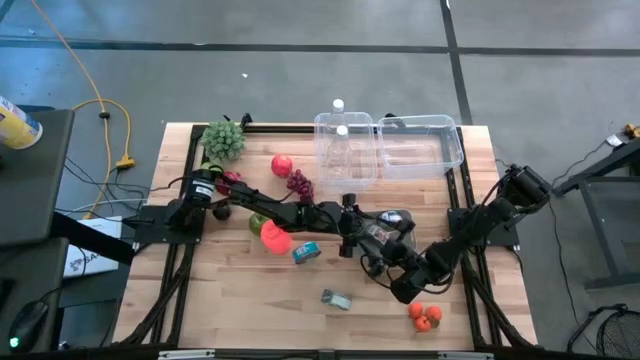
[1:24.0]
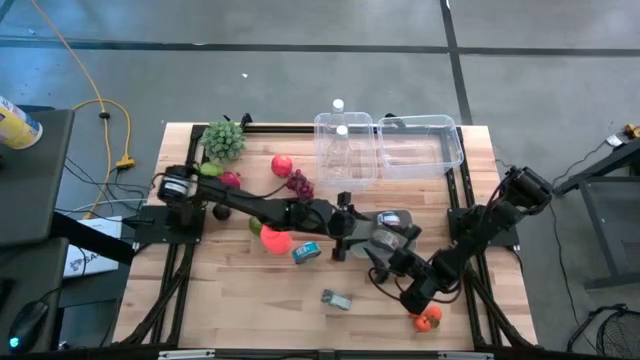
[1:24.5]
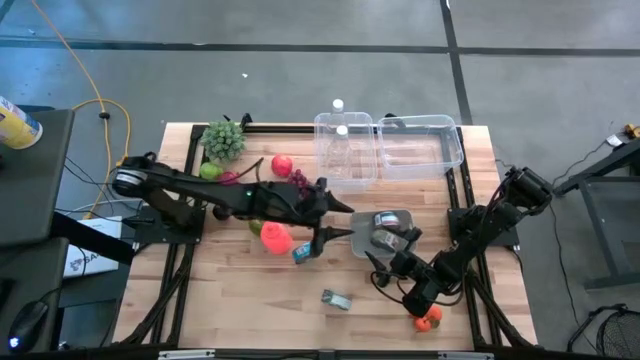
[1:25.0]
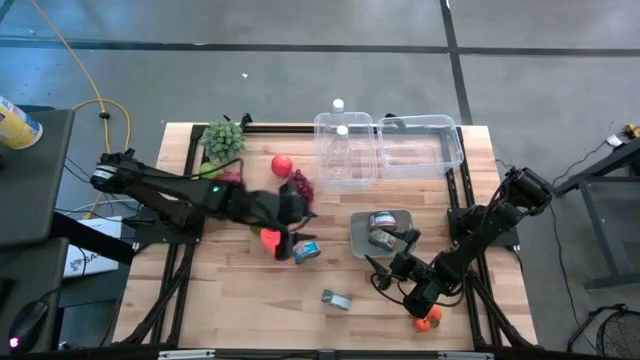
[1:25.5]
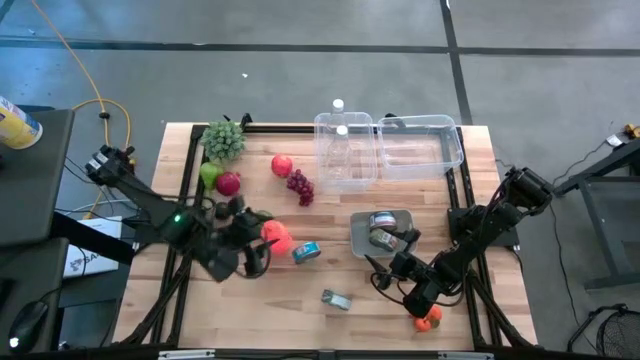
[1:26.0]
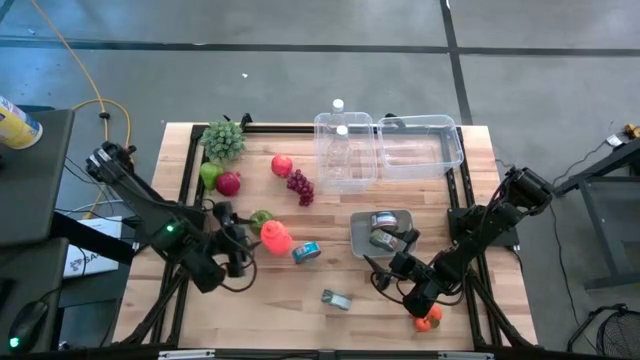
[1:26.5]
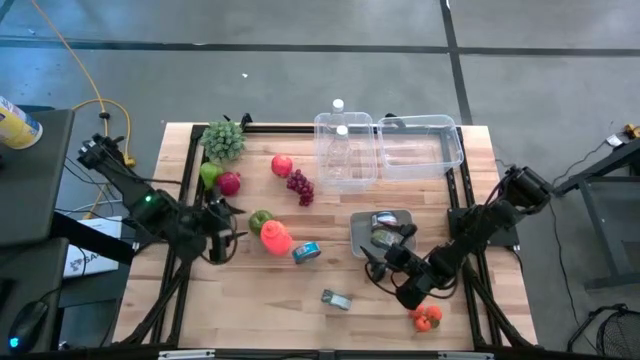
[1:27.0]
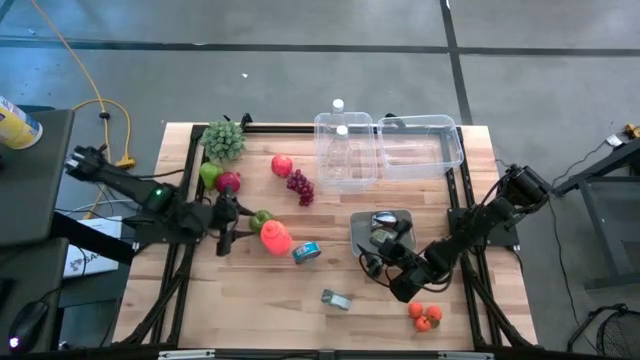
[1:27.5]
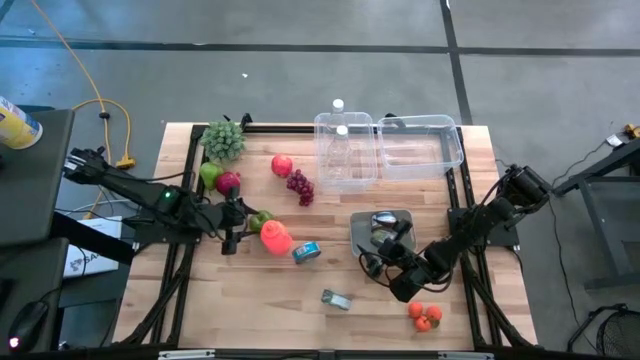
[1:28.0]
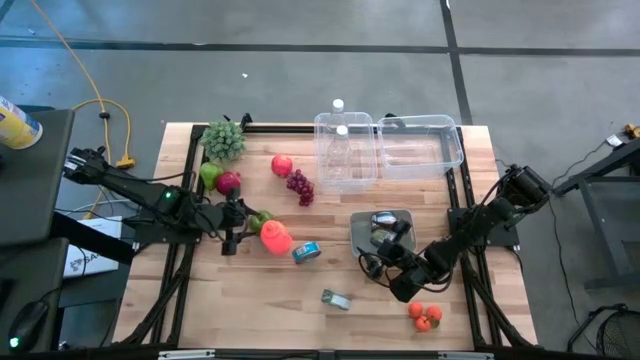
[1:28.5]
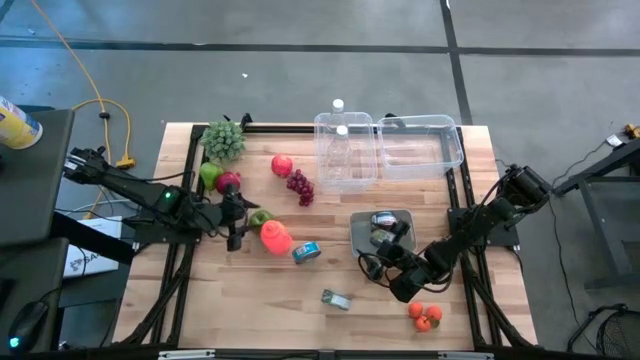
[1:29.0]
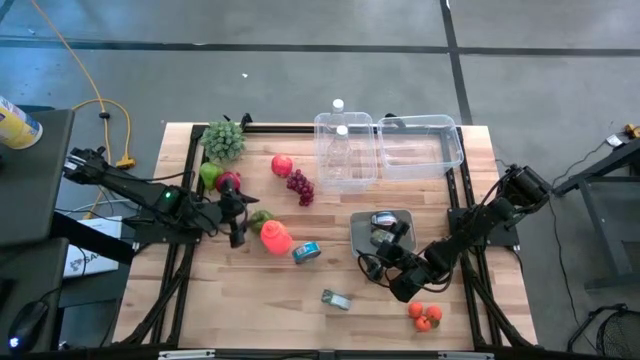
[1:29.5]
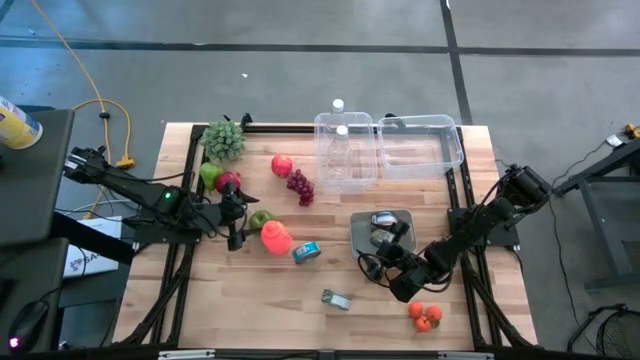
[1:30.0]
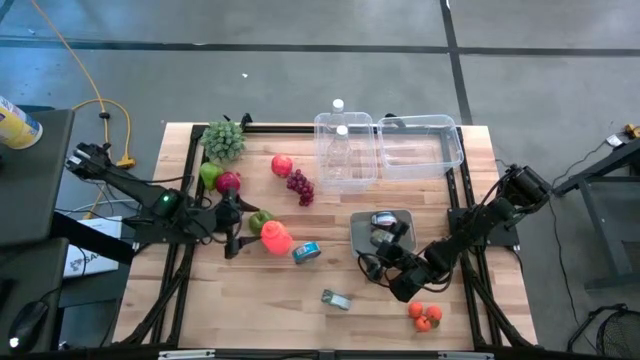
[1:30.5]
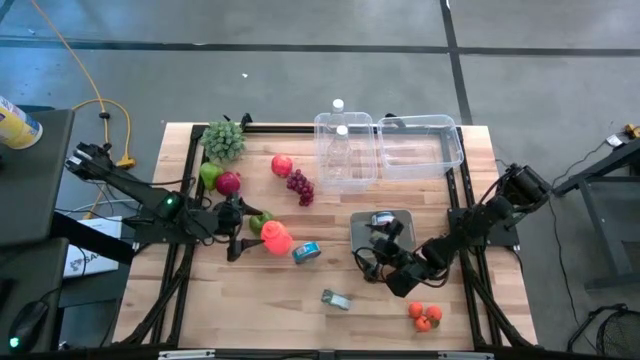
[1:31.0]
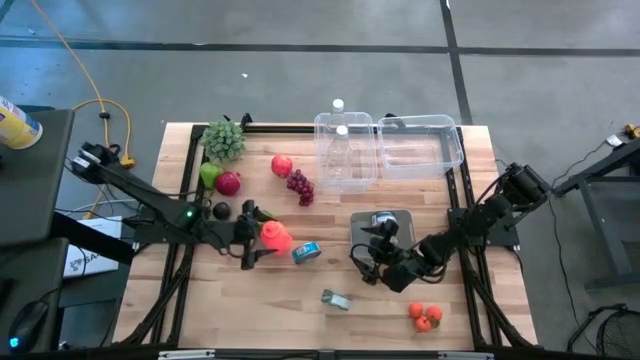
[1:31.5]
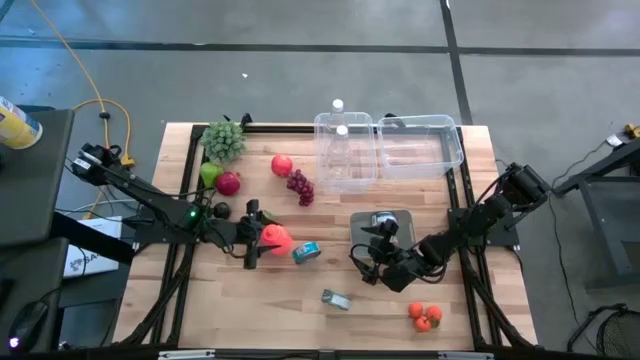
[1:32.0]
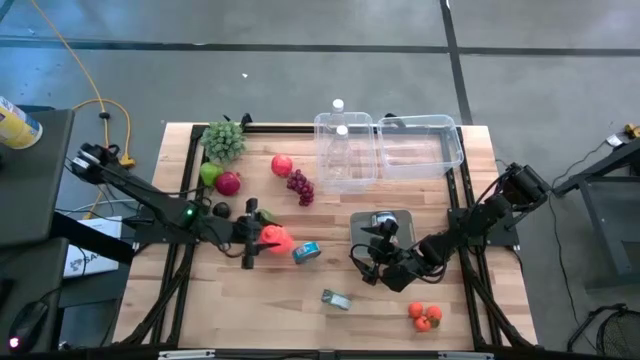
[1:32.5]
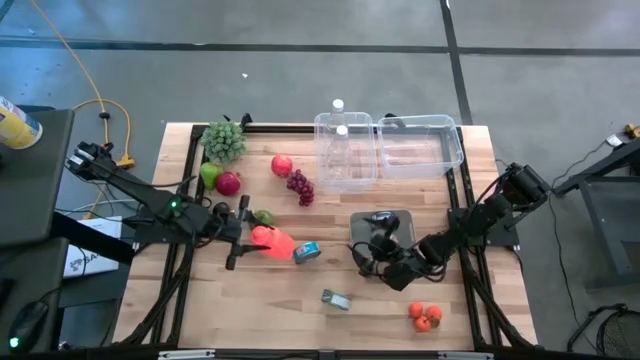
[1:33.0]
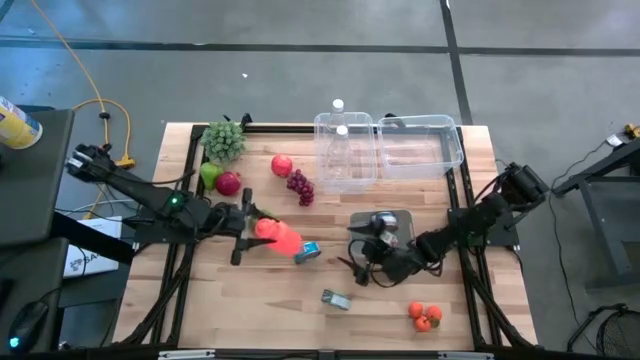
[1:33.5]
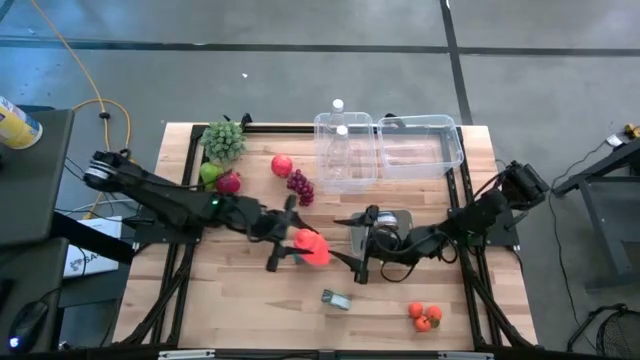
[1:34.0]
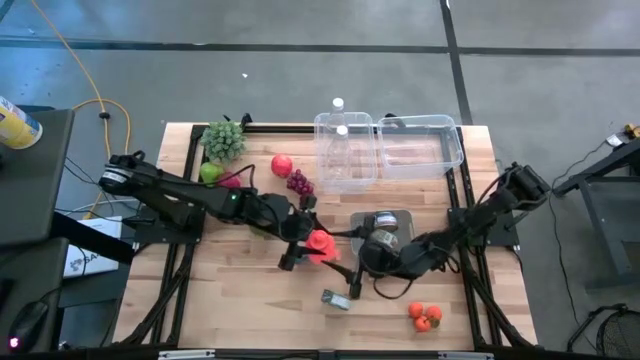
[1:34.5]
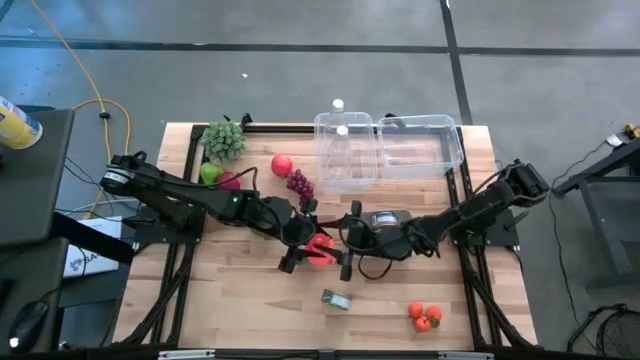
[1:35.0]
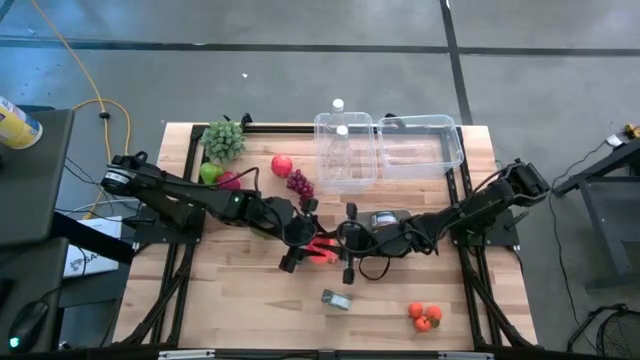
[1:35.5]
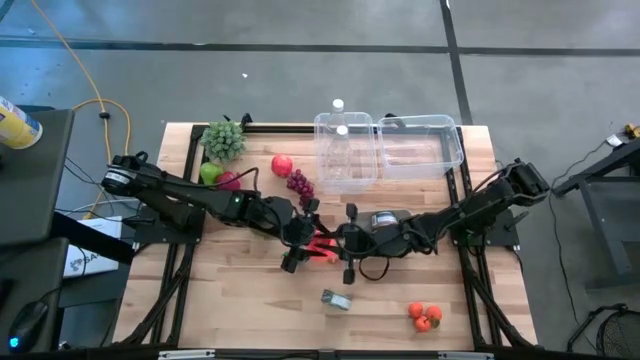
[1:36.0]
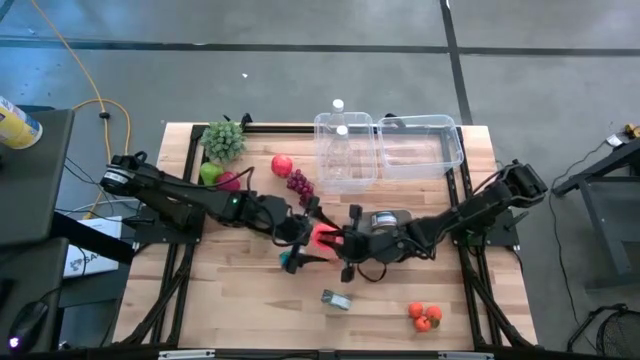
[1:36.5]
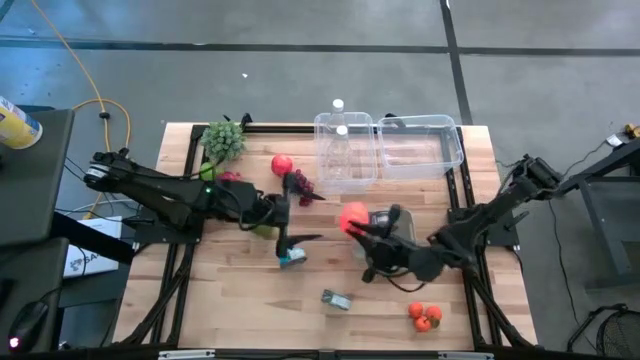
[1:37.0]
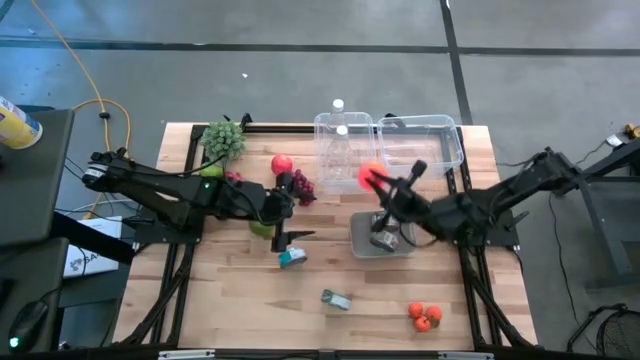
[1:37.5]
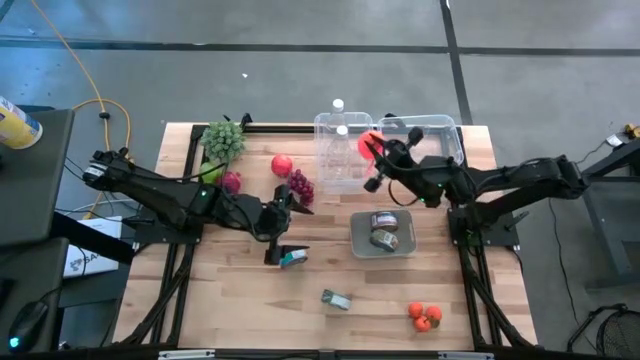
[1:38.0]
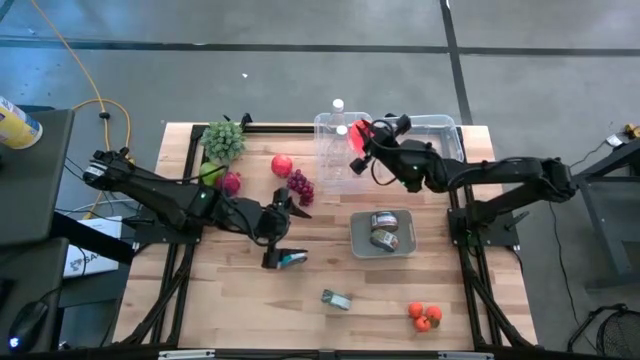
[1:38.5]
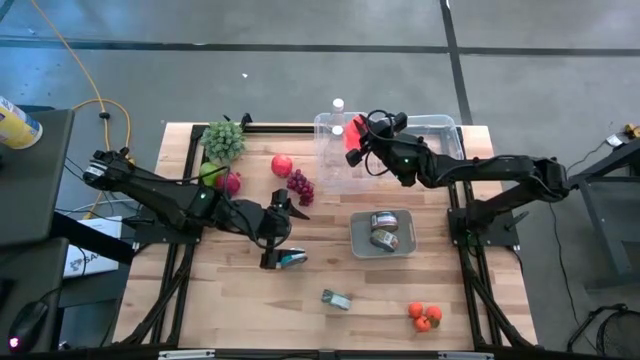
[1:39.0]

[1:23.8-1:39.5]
Task: Pick & Place Food Item
Put the orange water bottle into the left transparent bin

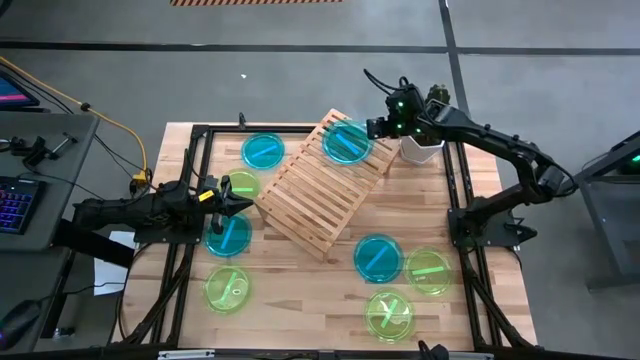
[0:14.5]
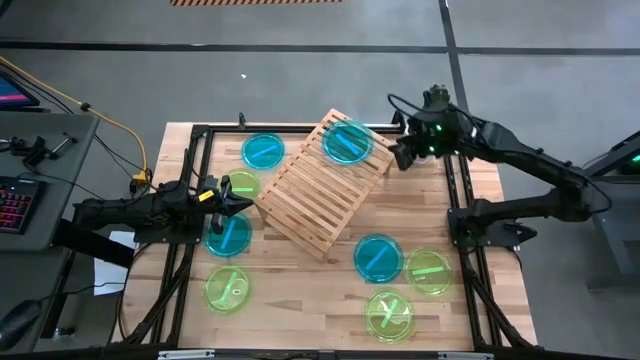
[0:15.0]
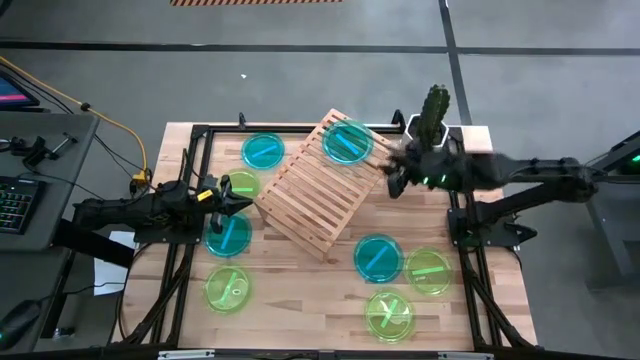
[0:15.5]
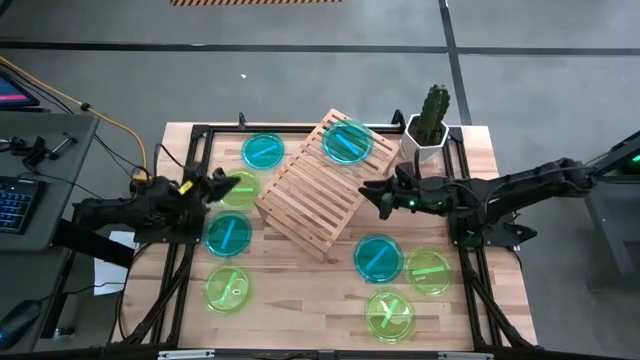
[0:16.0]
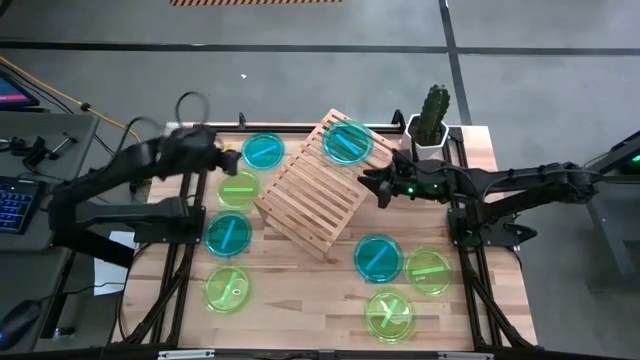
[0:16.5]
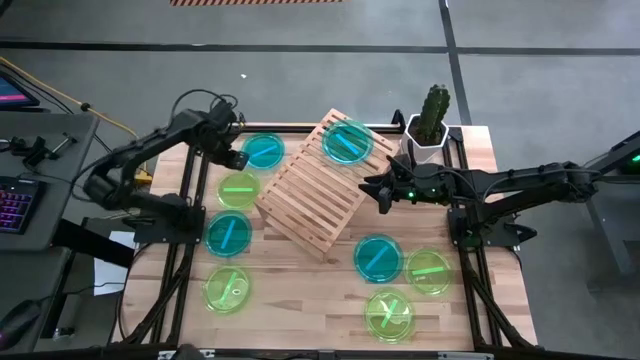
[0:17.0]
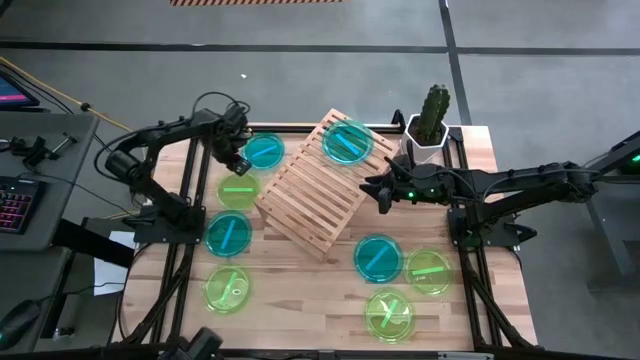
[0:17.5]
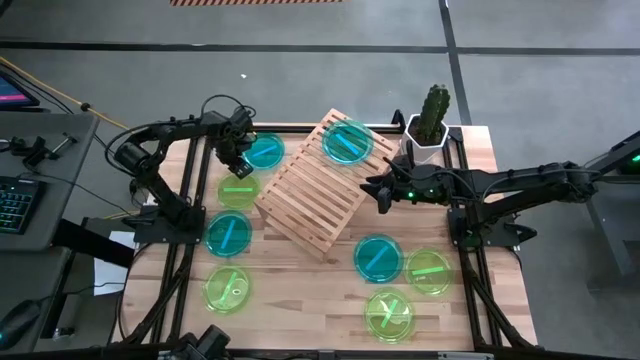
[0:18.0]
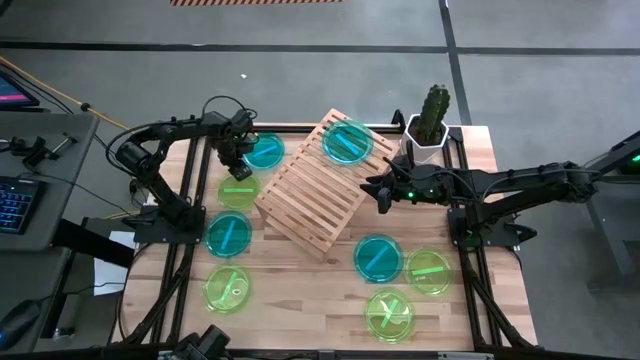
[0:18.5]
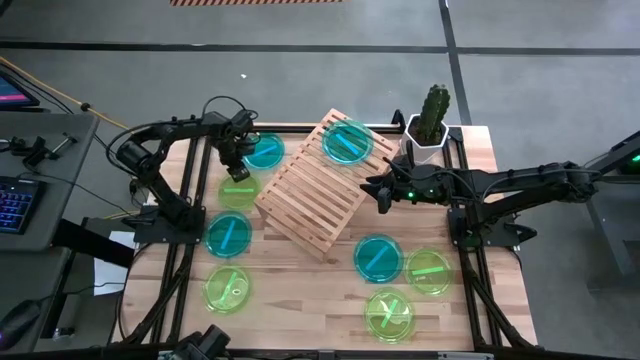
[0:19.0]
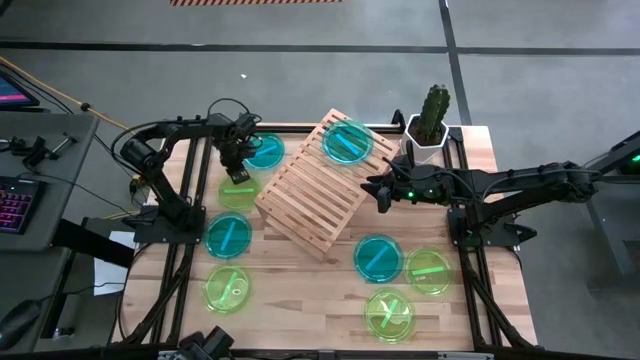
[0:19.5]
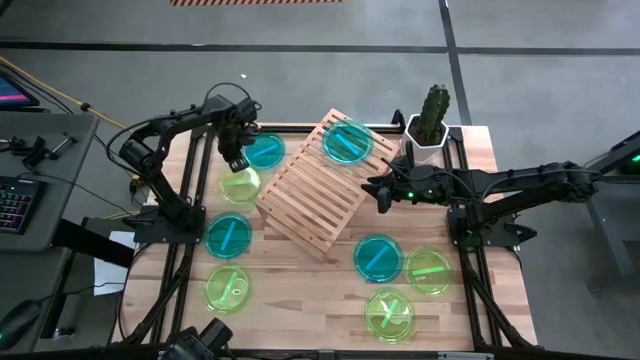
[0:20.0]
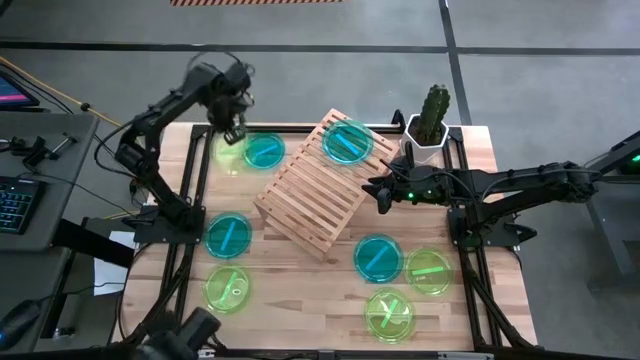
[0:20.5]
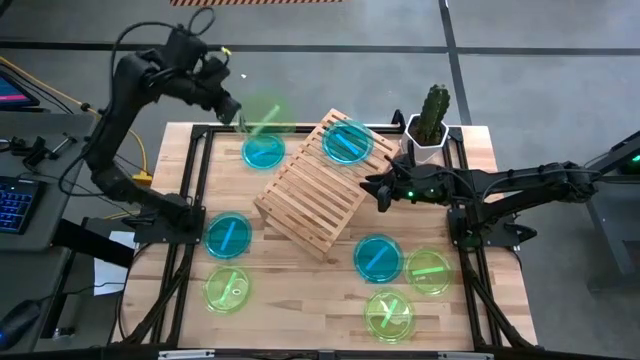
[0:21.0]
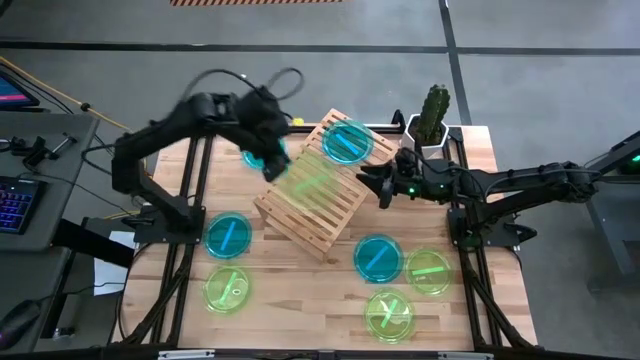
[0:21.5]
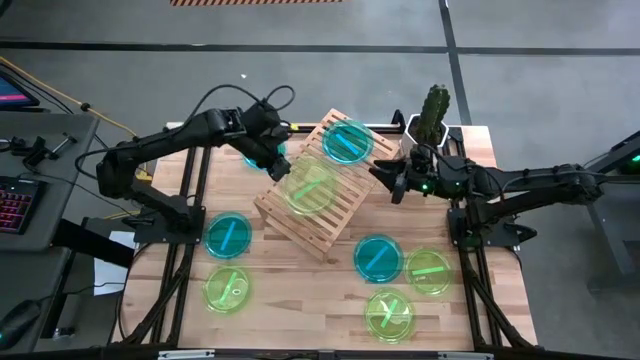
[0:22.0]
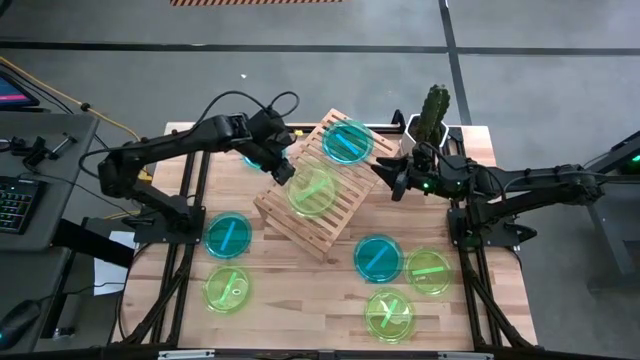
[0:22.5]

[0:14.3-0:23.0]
Task: Place and stack plates onto a shelf
Put the green plate on the shelf
